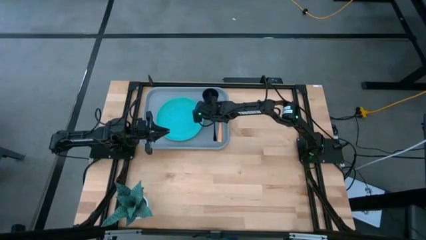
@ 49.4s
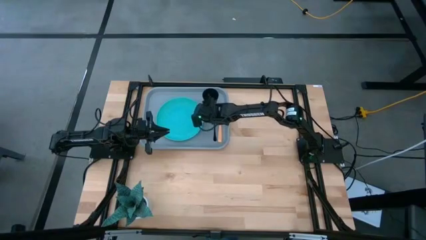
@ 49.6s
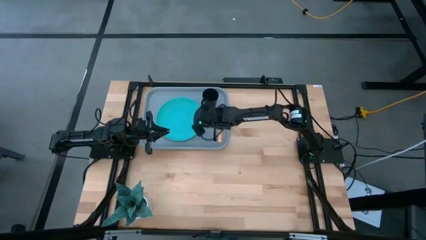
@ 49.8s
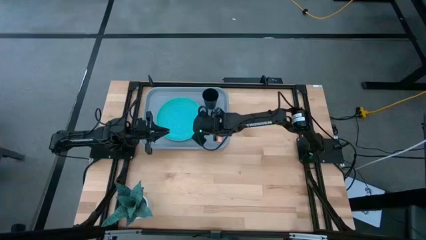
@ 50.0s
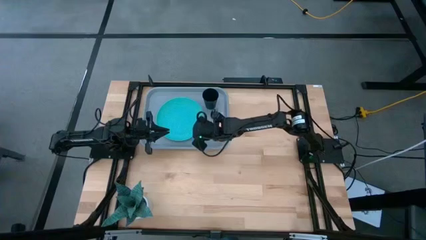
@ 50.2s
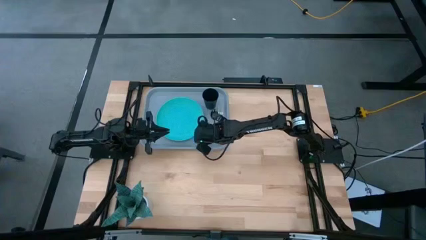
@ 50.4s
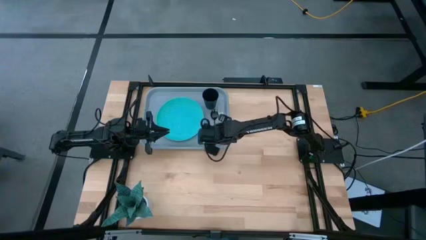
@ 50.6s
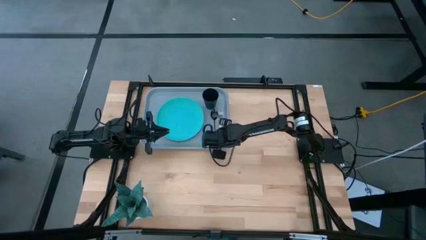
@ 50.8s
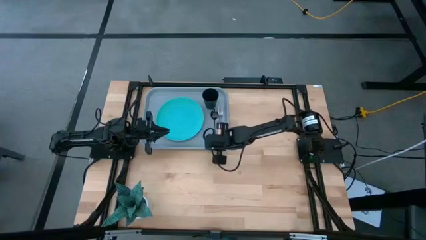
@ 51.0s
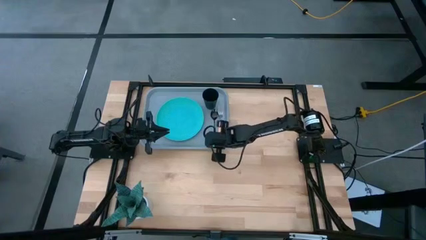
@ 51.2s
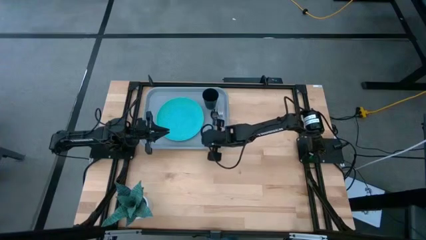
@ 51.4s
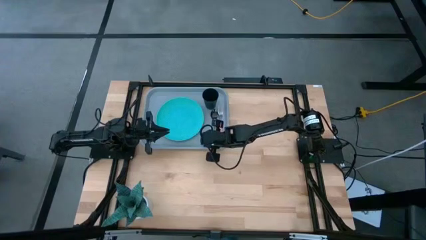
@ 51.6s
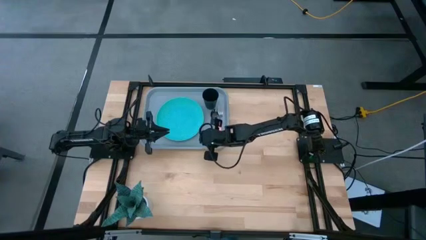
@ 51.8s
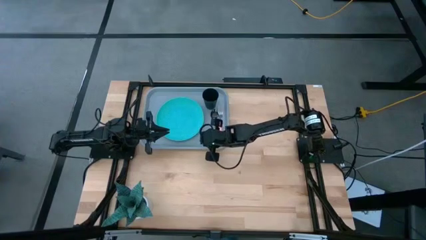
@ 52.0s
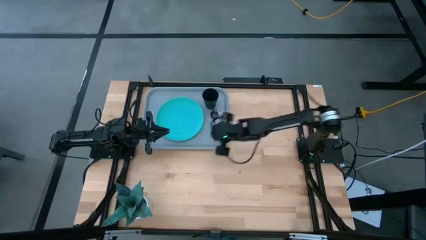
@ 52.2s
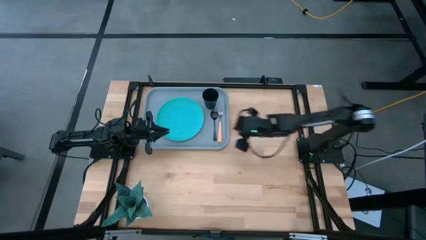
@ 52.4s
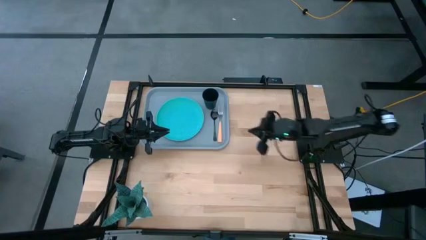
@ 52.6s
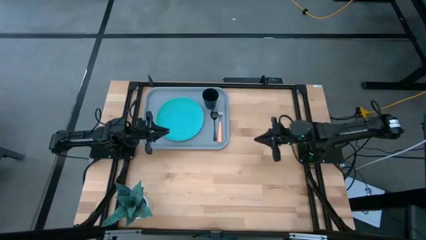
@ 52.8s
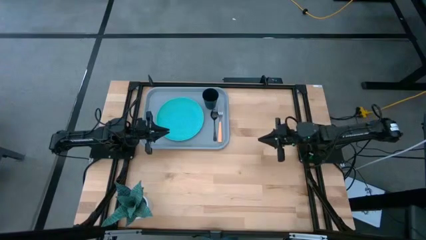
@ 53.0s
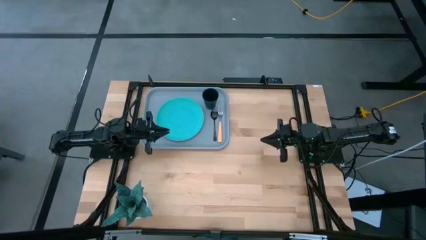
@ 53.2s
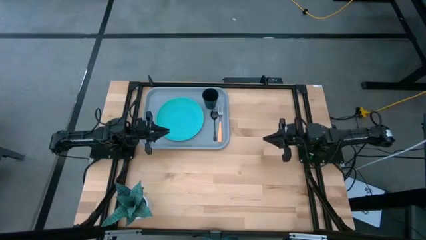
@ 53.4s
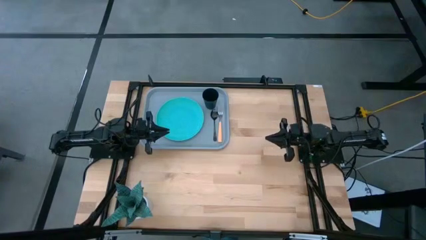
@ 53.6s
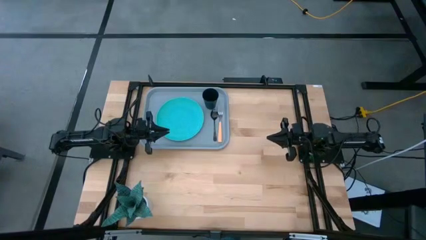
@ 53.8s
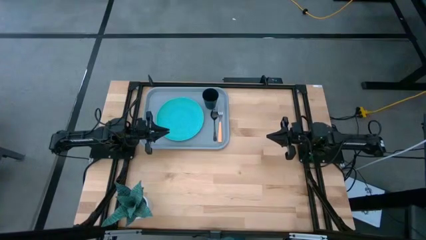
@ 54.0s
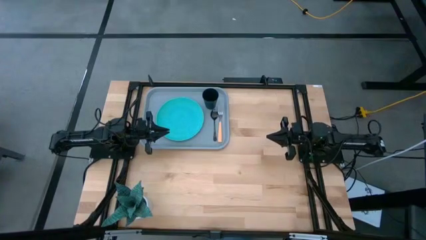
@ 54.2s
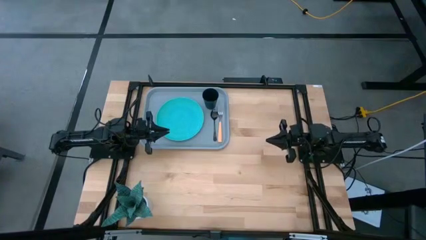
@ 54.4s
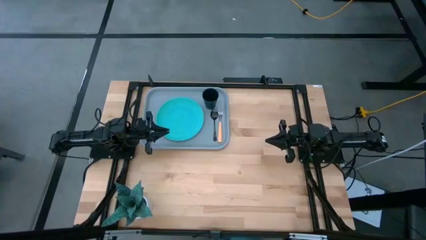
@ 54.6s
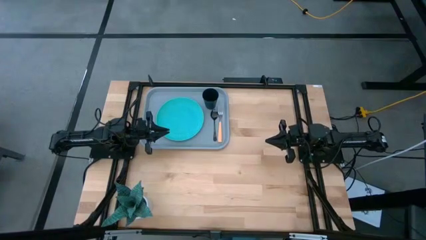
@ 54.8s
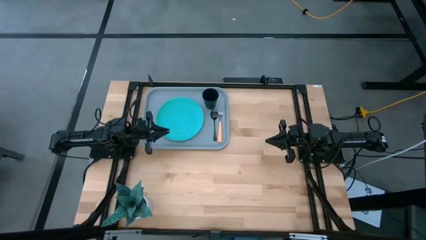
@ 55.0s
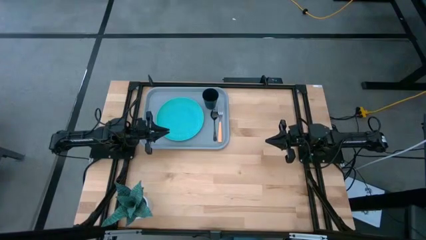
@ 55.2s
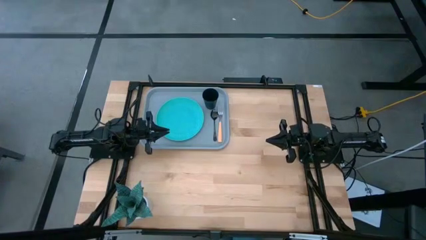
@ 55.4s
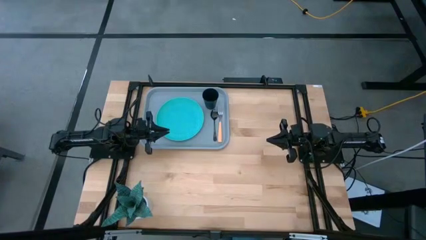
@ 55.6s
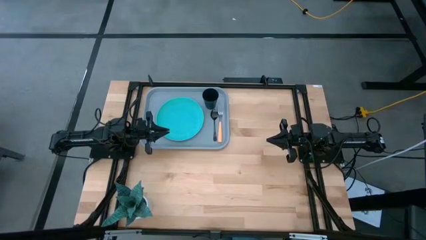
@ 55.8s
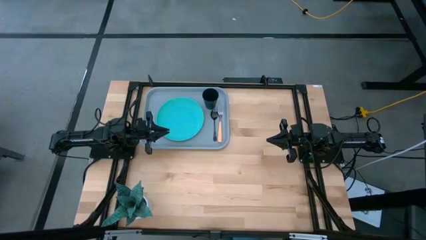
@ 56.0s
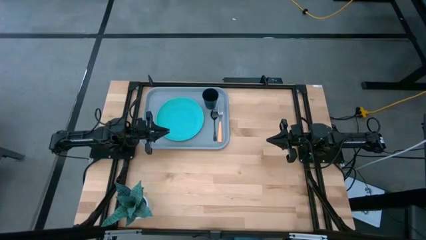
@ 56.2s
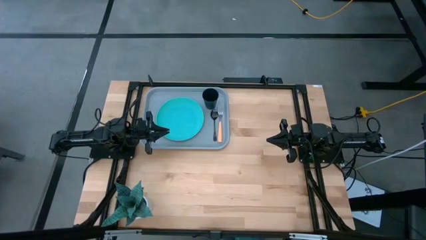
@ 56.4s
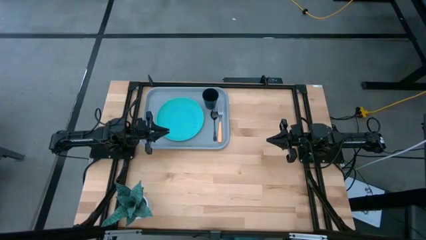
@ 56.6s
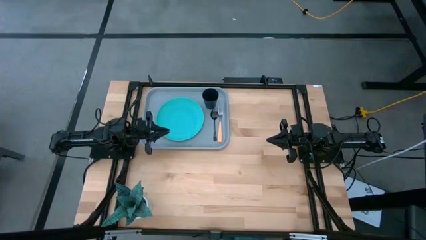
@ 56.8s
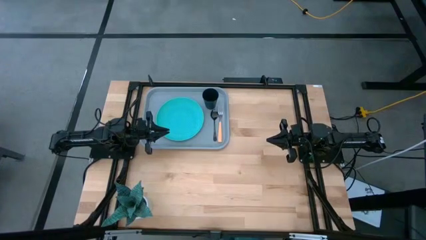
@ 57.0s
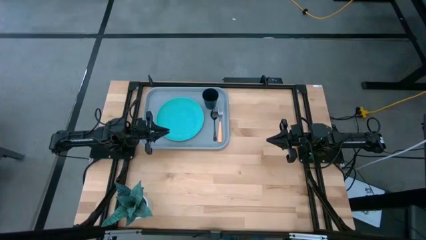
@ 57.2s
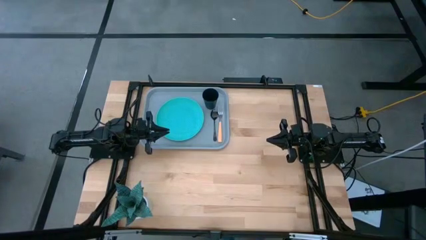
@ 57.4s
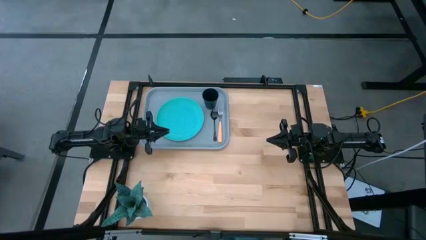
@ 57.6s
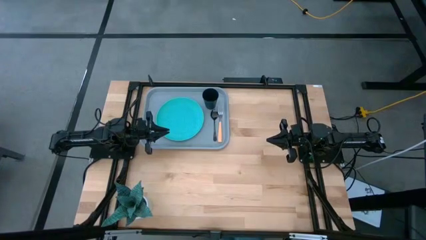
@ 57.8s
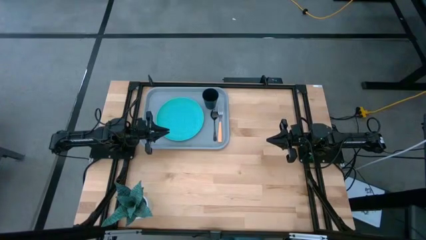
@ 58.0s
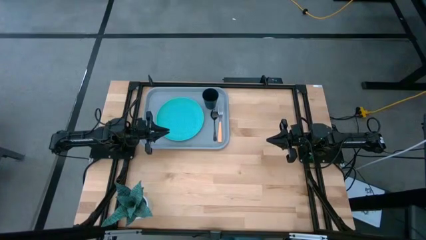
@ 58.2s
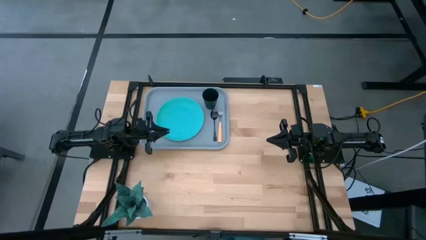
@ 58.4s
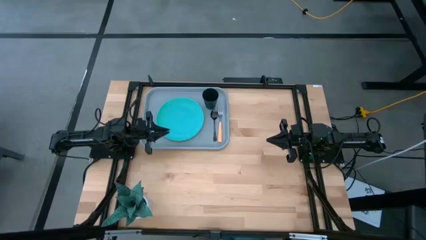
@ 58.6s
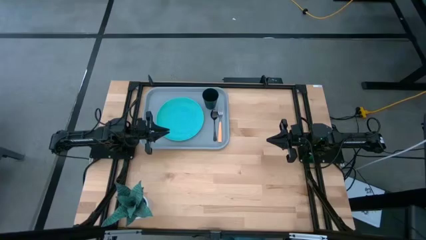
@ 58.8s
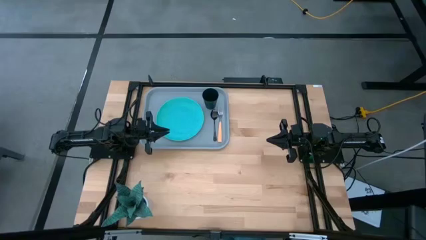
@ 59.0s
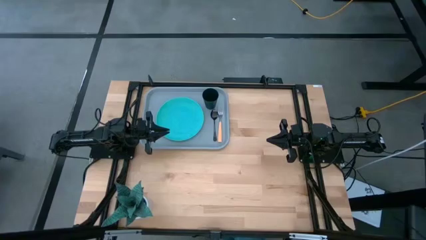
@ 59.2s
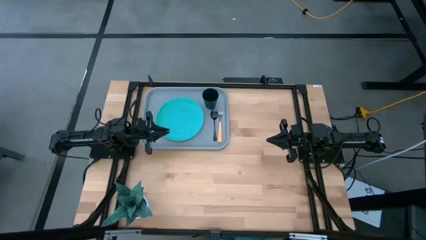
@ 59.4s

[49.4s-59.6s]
Task: Pick and place plate/cup/fork/spoon on tray
Return to Home Position
